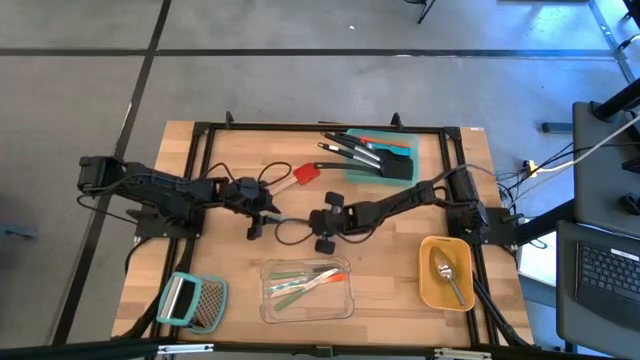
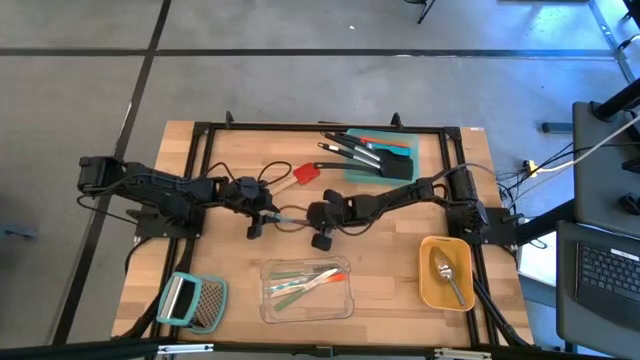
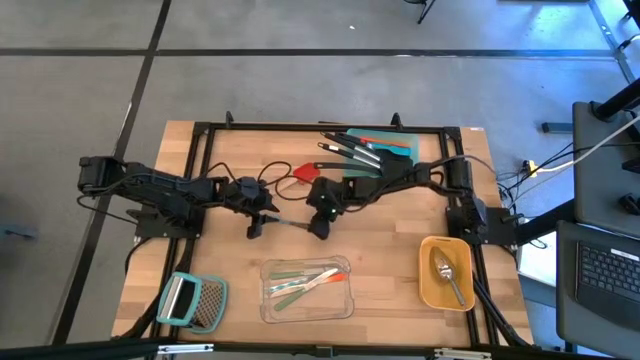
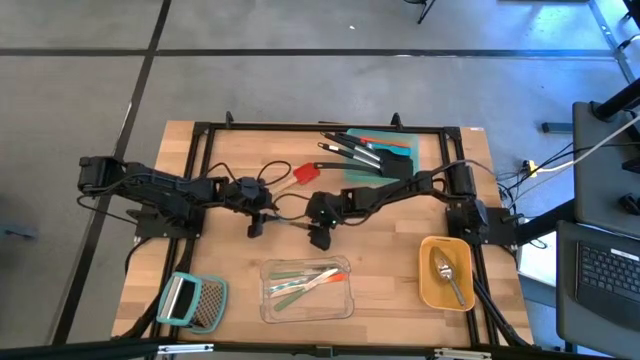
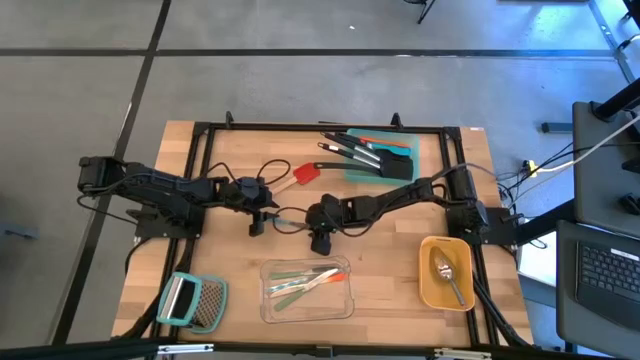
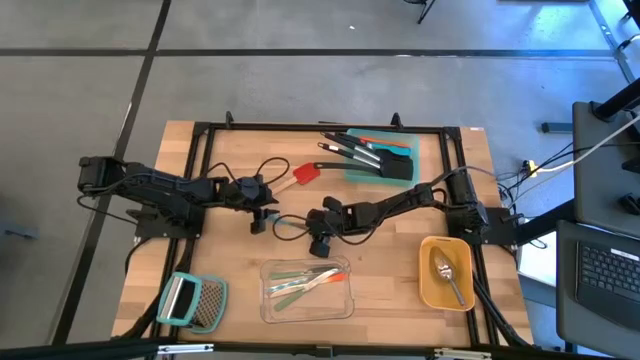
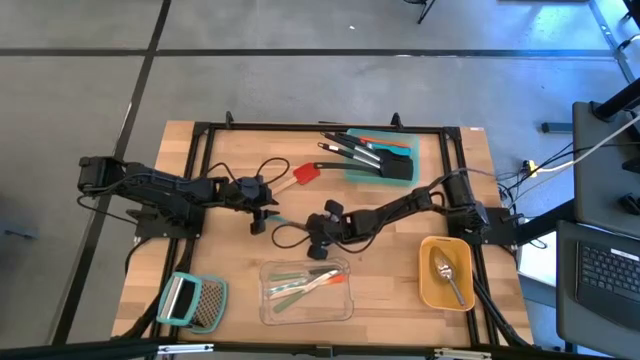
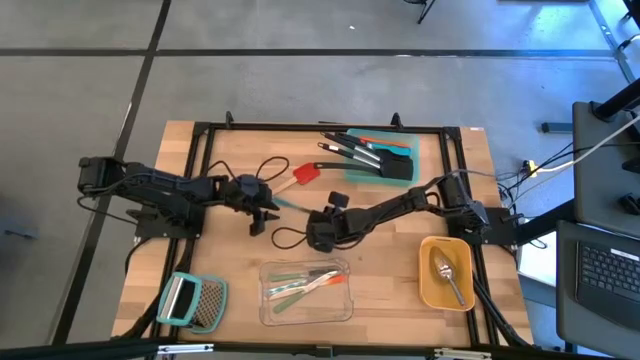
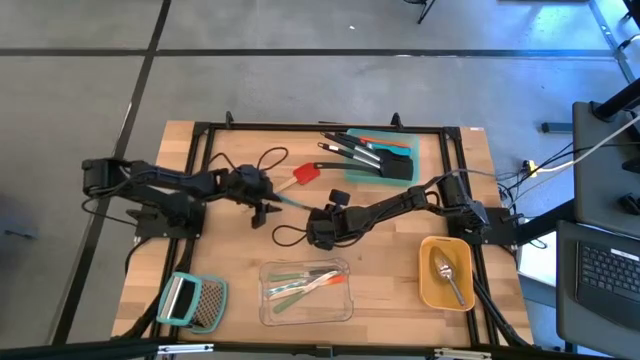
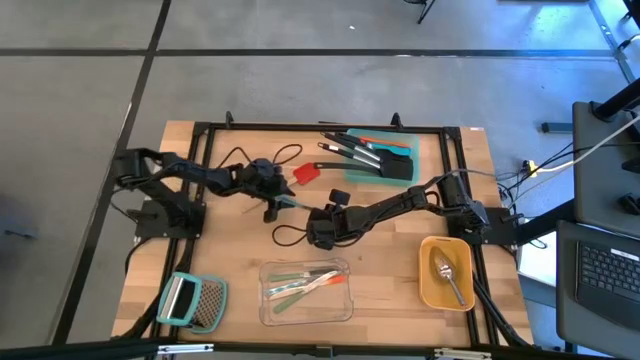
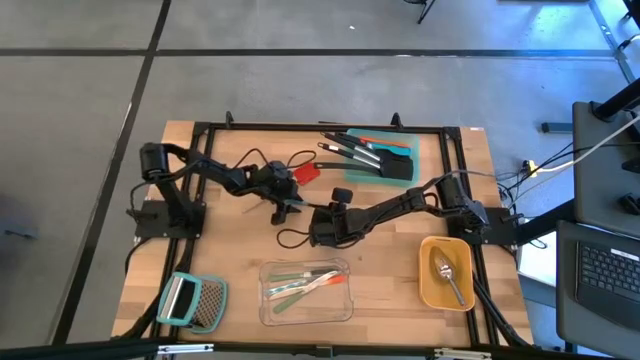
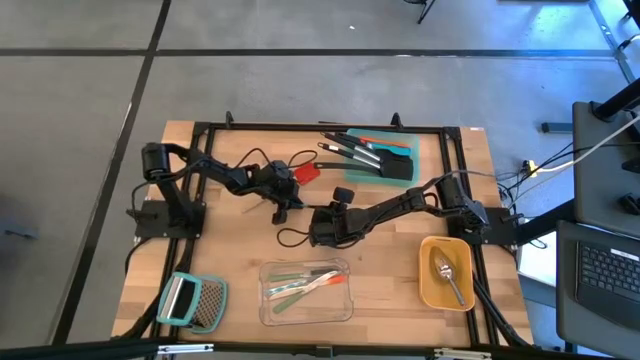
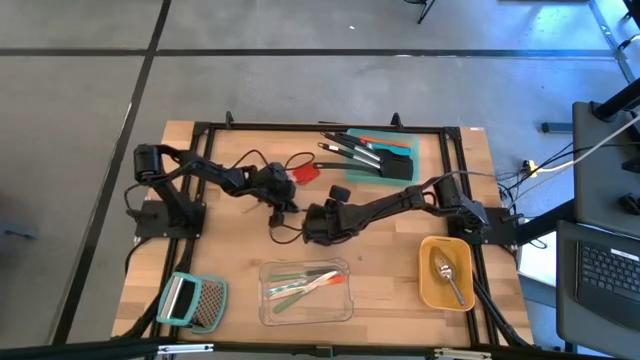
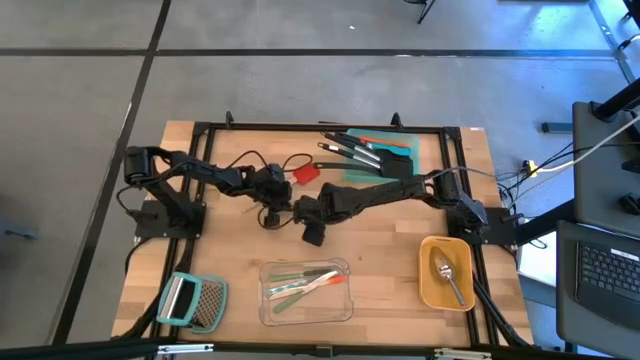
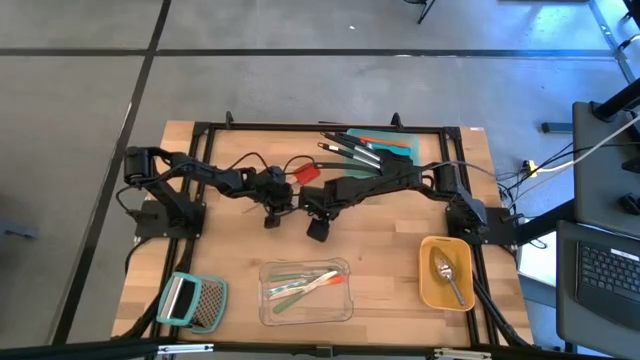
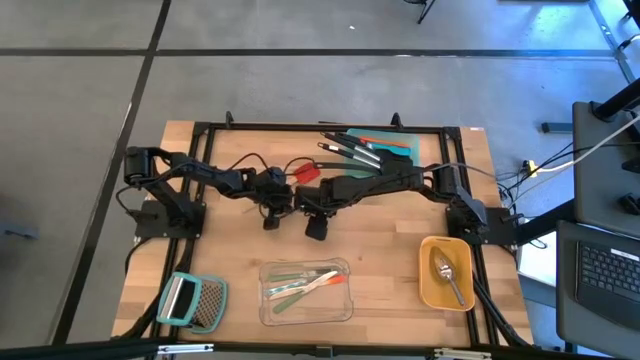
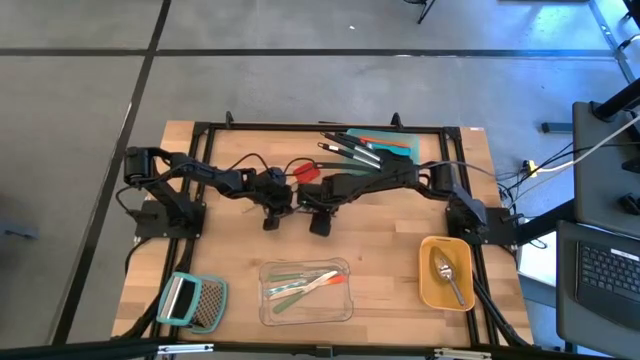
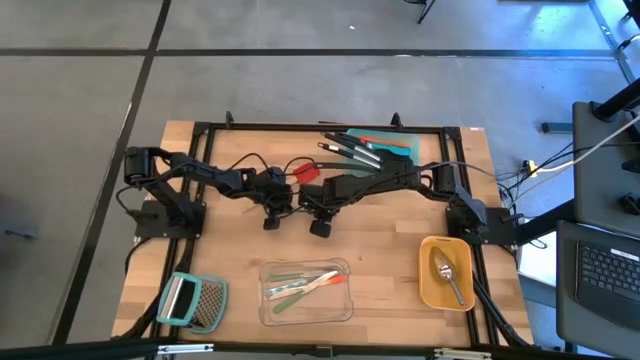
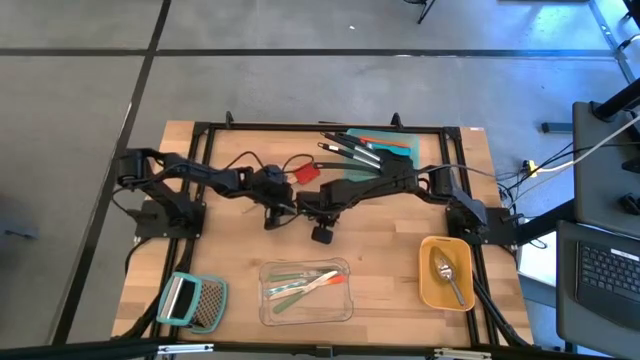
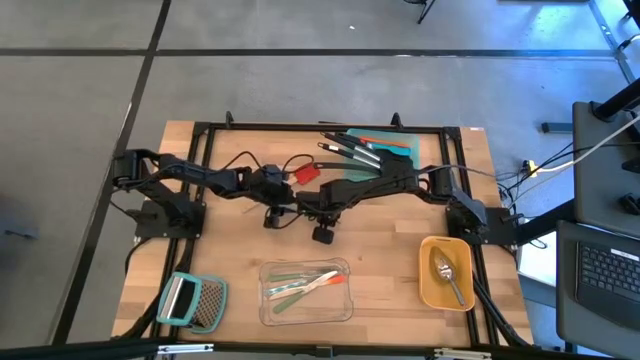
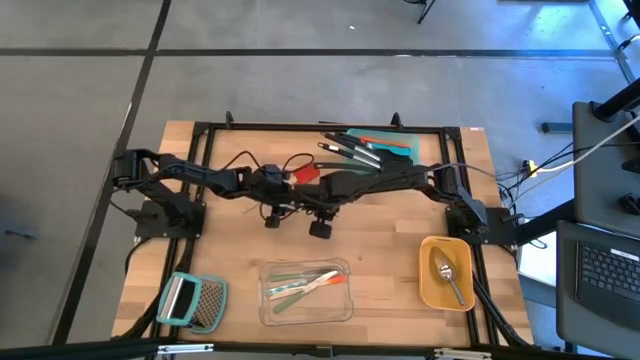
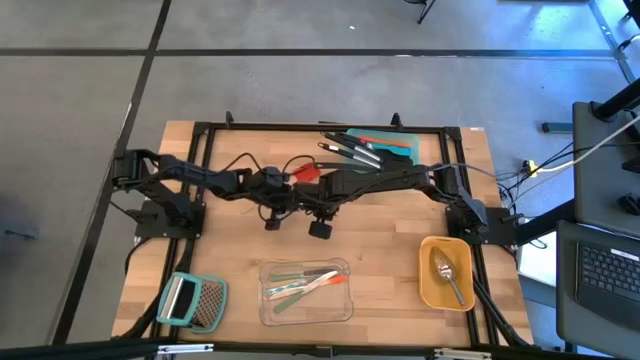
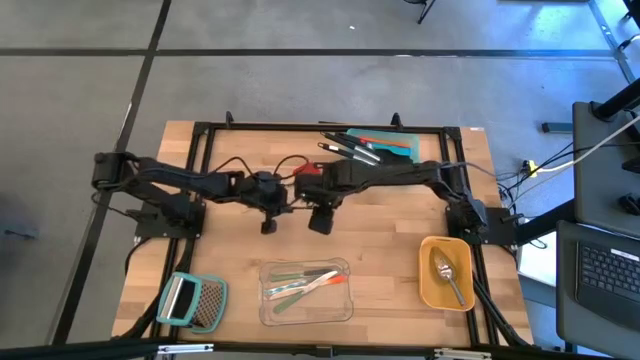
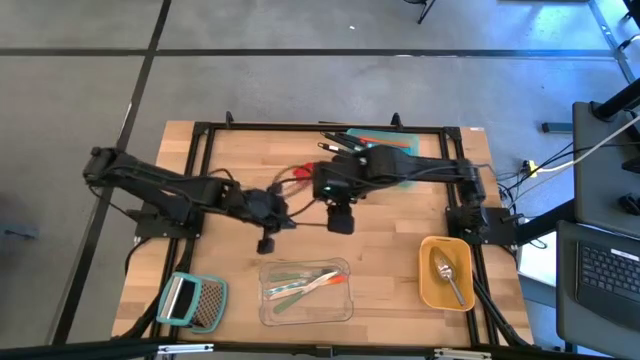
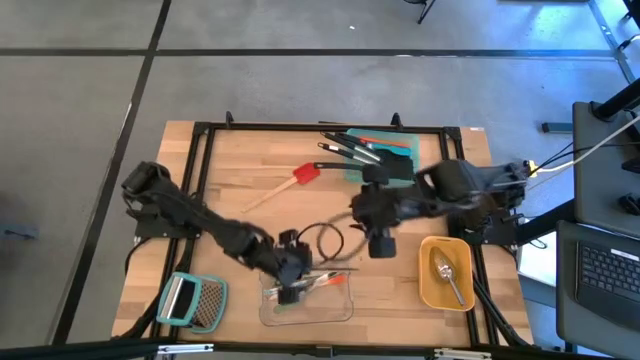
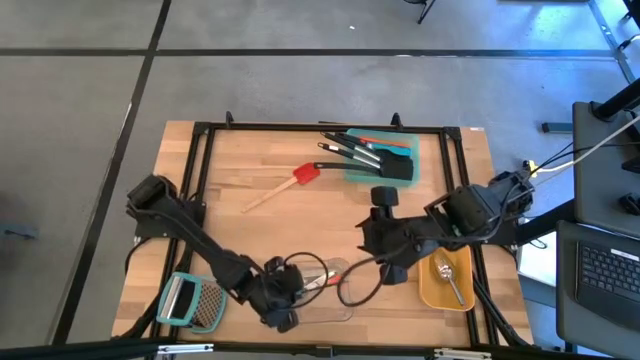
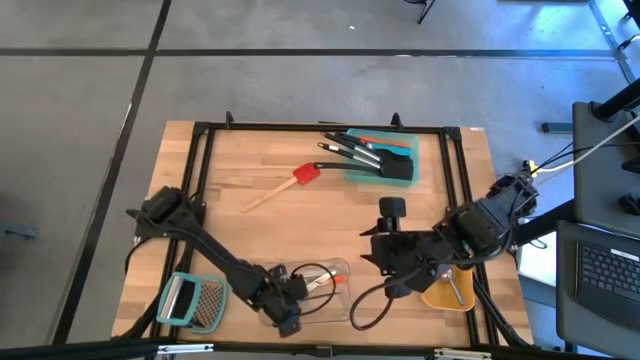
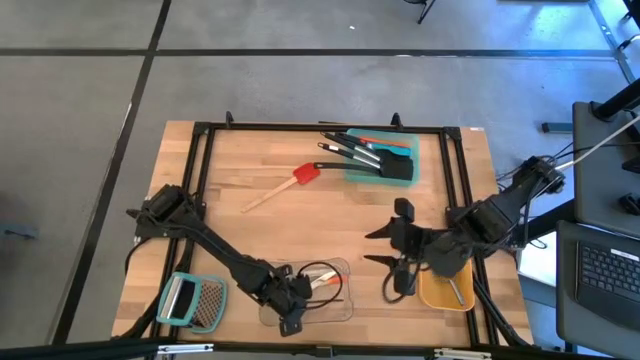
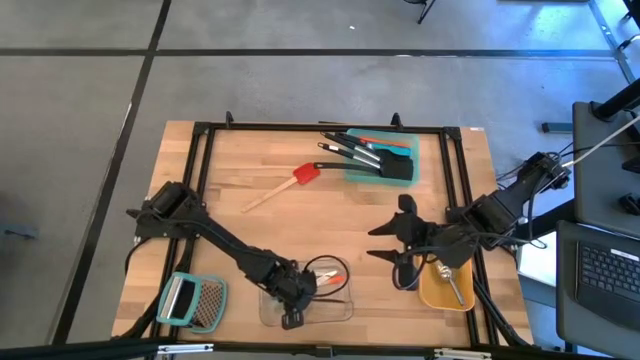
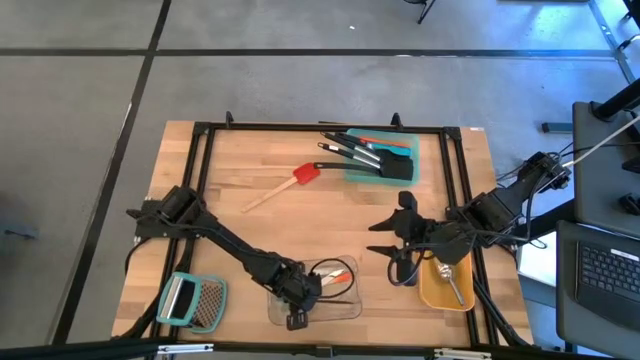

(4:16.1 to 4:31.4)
Task: Pick & Place Kitchen Items
Put the blue table knife into the transparent bin

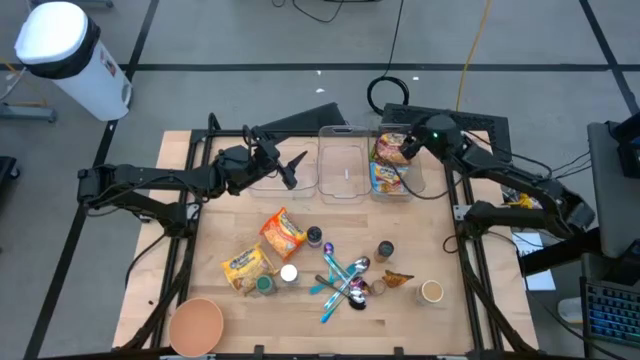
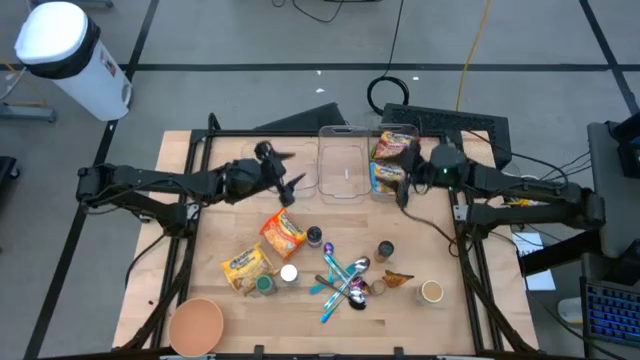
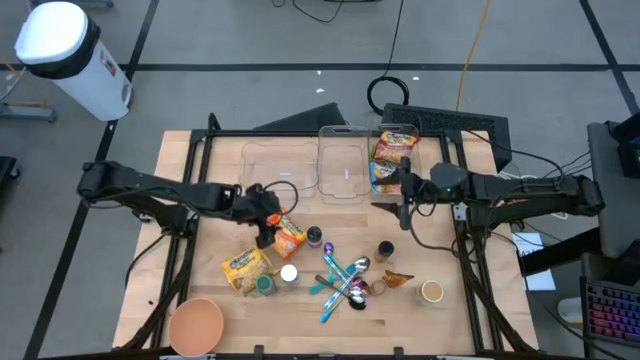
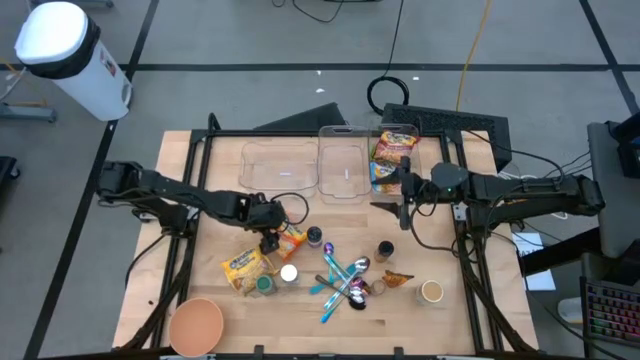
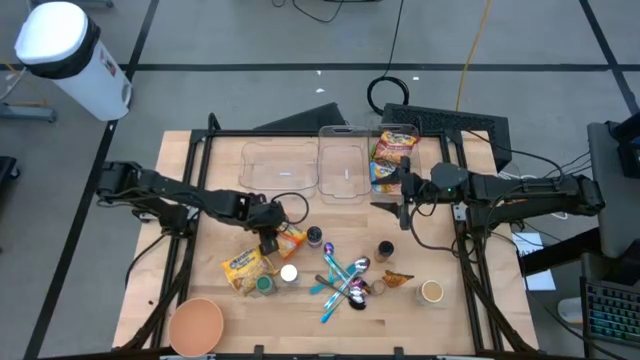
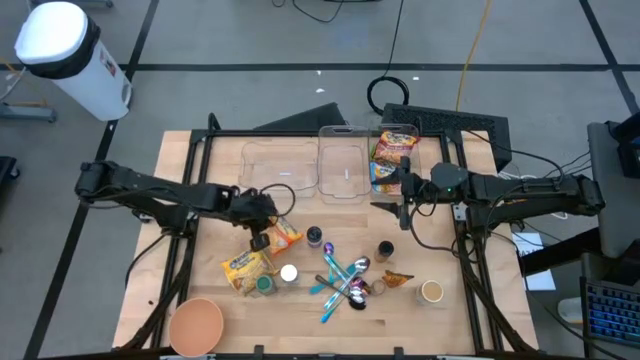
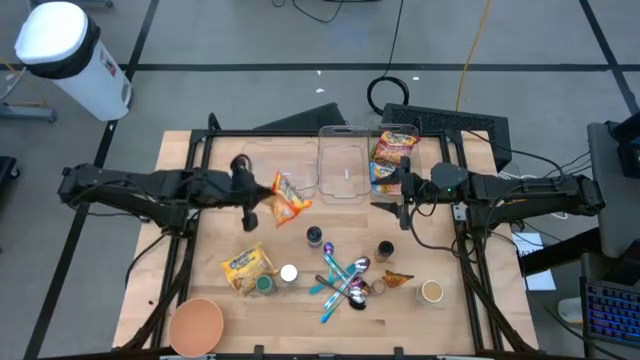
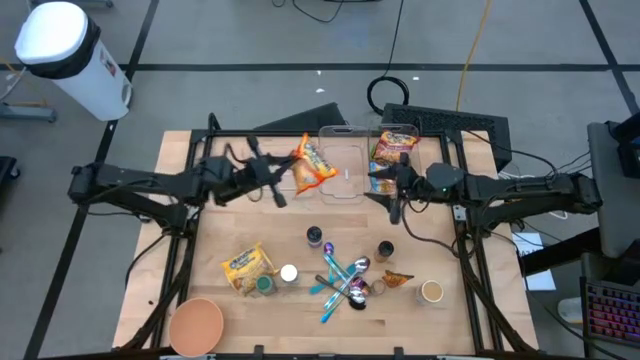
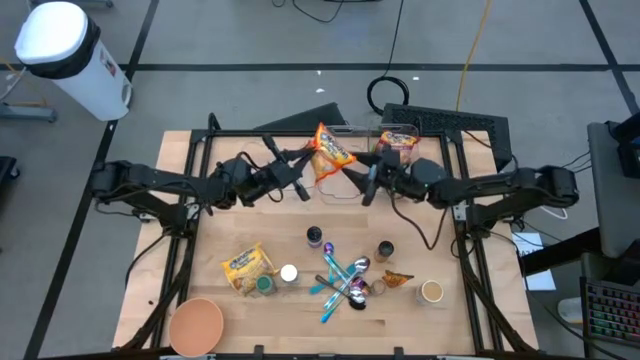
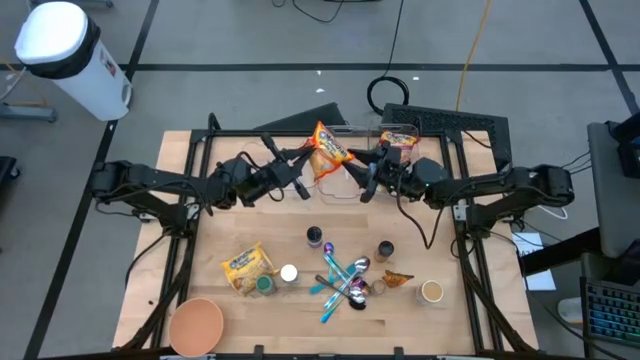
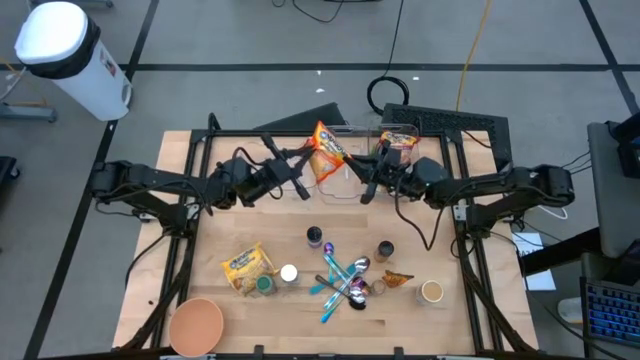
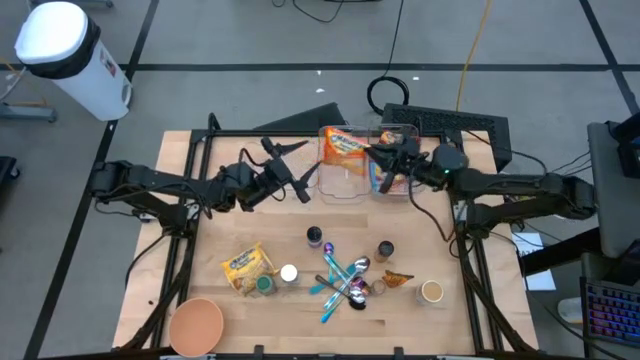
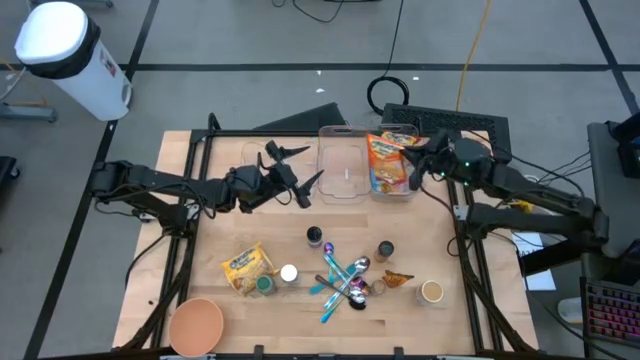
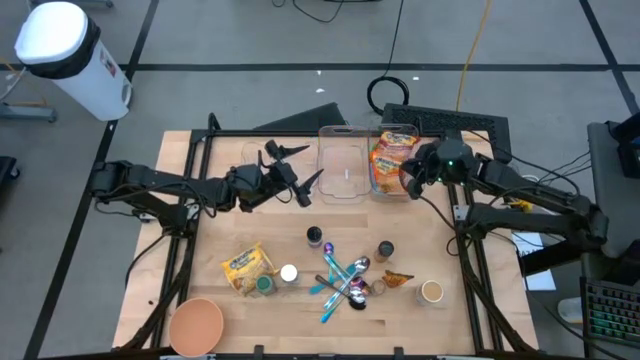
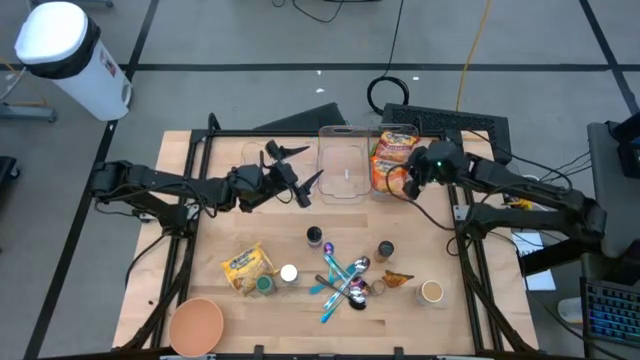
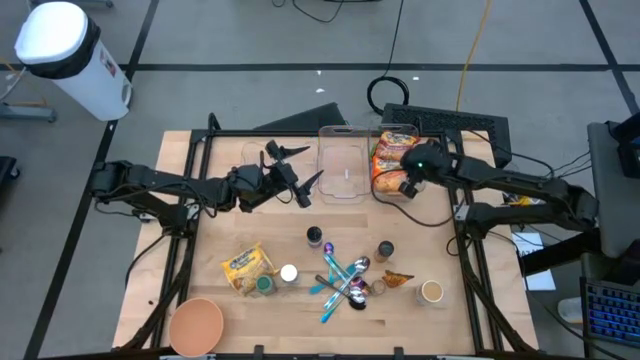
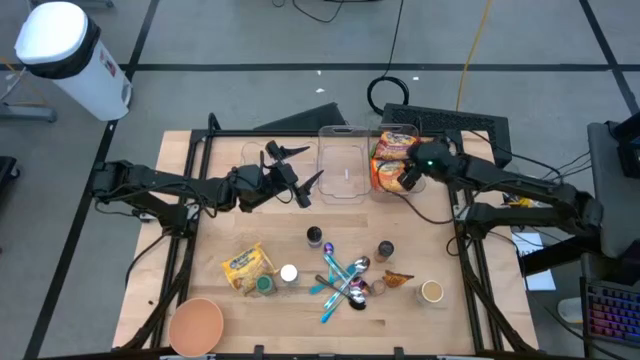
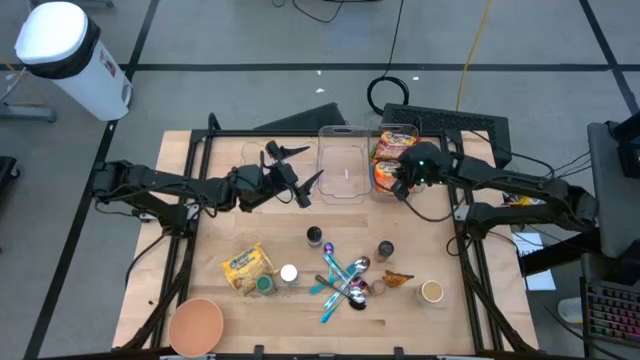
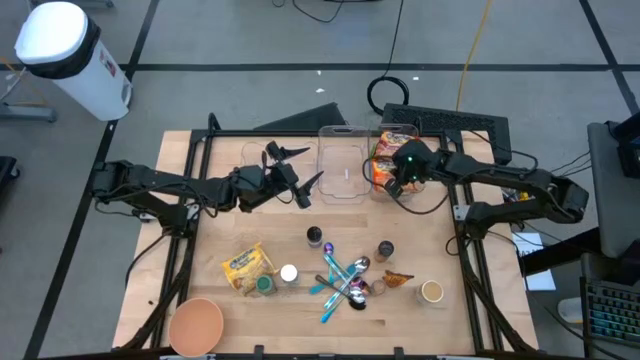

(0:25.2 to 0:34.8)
Task: Pick & Place Food Item
Put the orange noodle pack into the right transparent bin
